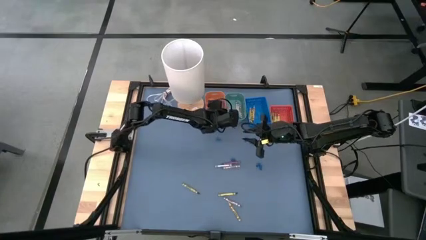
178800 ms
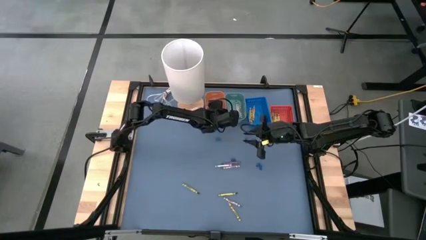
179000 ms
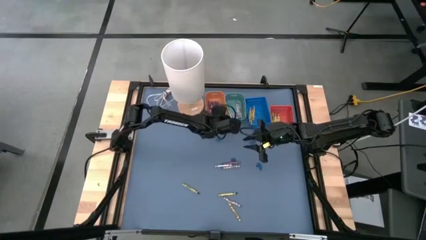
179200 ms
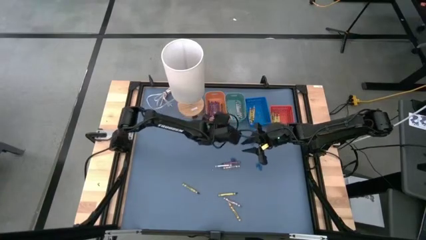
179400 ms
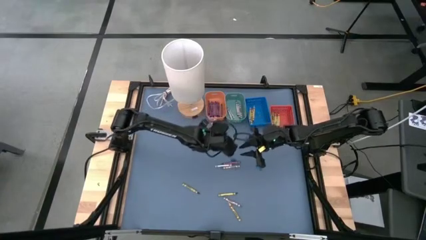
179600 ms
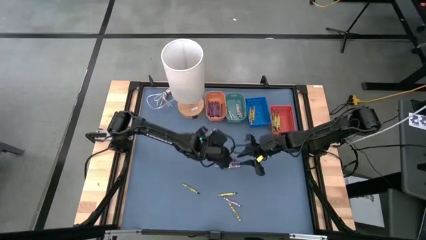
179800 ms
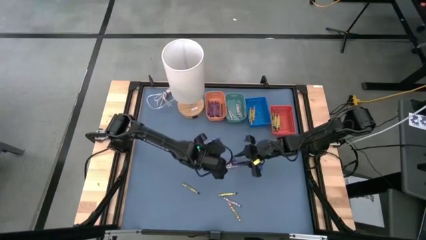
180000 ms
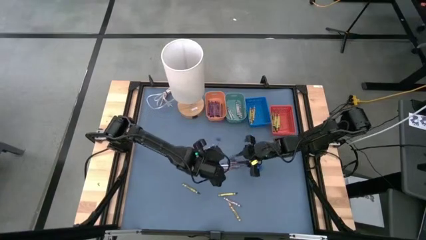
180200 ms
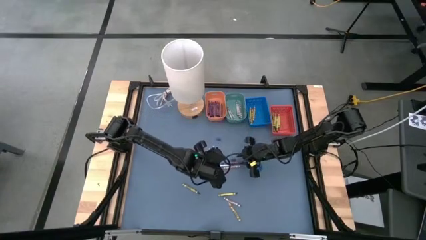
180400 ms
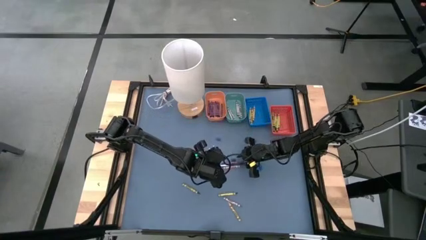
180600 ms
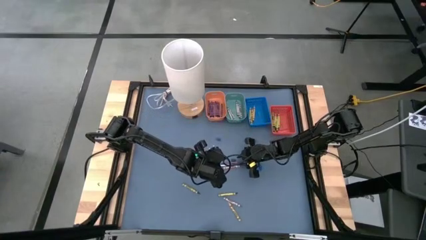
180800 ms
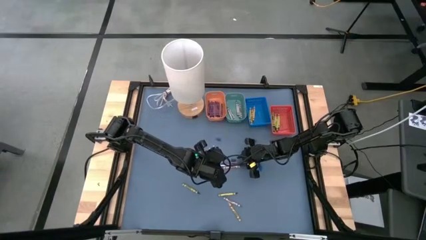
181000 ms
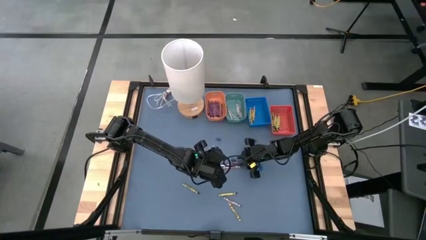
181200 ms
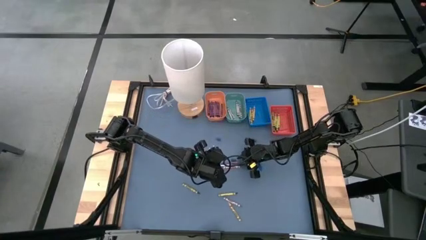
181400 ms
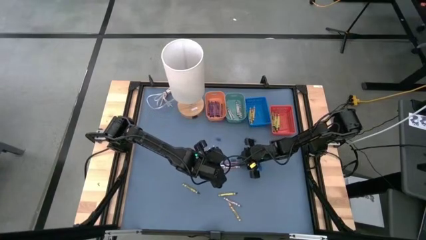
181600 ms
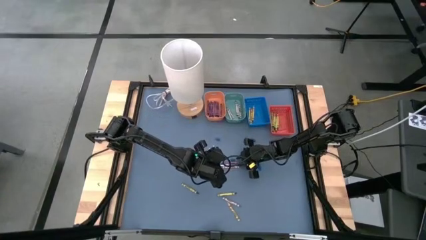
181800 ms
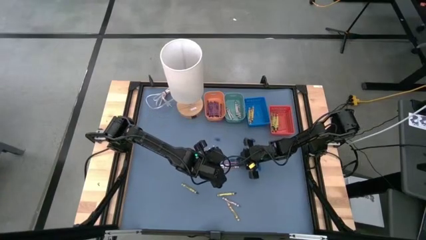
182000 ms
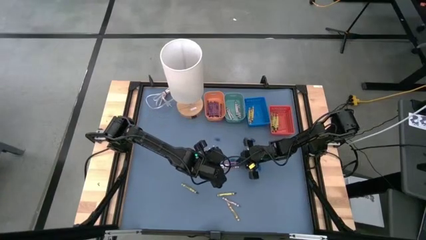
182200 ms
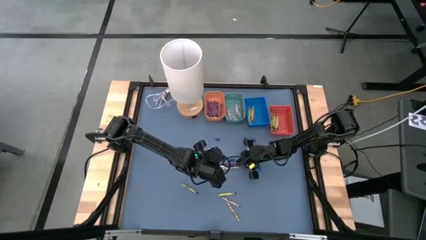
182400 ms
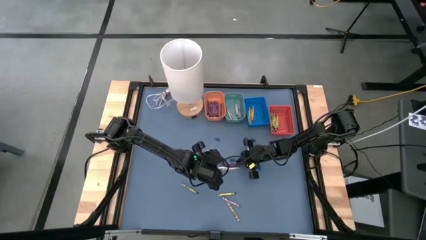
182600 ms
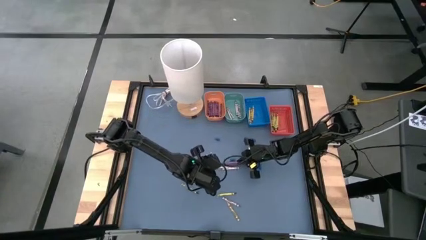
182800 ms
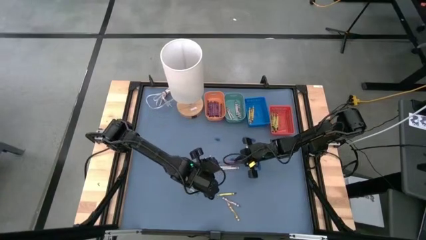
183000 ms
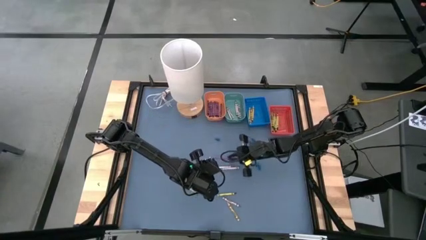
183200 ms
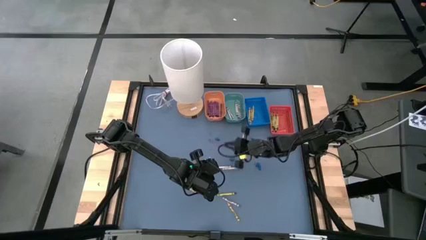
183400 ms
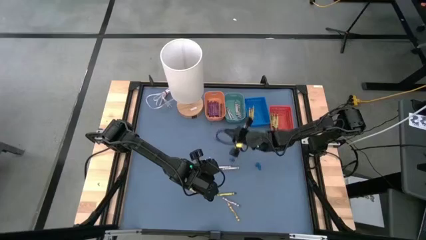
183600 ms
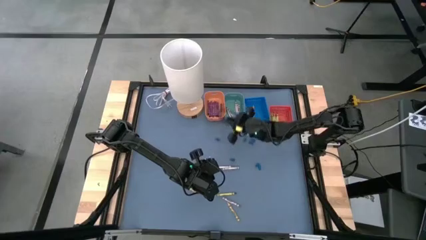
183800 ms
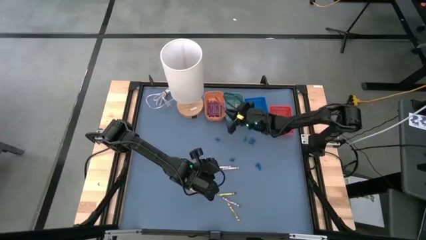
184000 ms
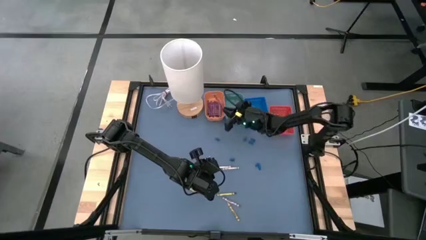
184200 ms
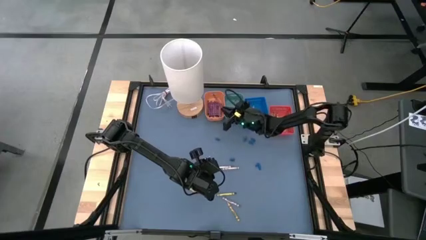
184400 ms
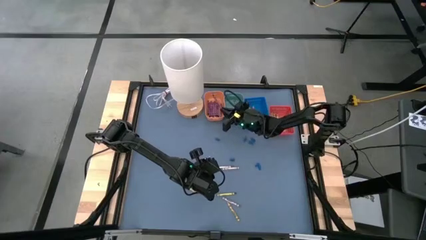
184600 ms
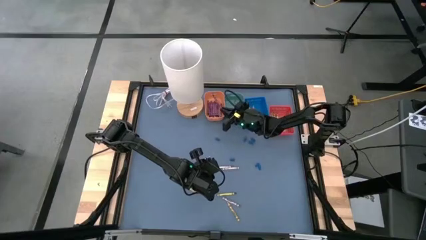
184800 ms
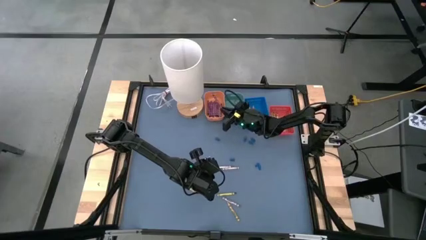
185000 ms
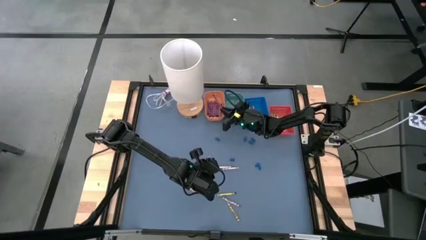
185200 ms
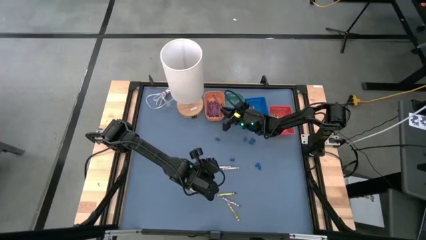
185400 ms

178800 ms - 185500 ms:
Task: Sort crayons
Put the purple crayon into the light orange bin

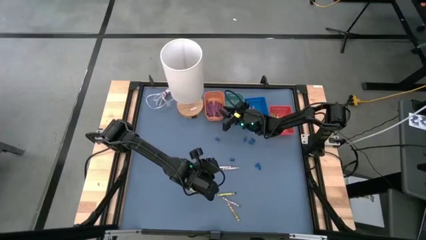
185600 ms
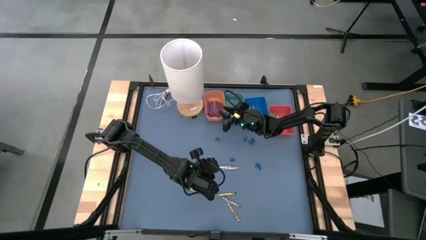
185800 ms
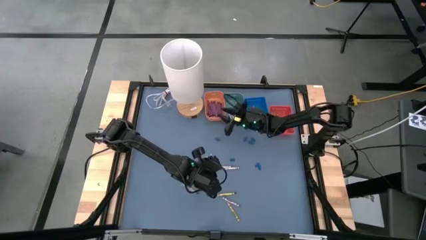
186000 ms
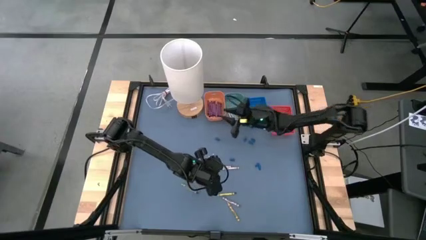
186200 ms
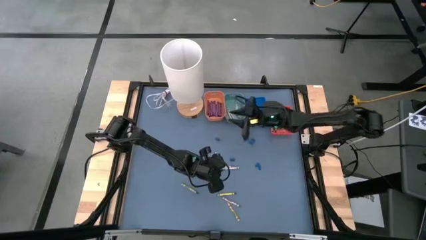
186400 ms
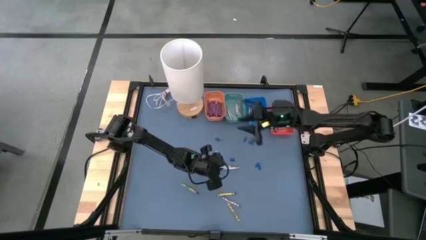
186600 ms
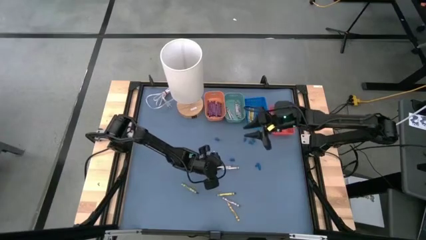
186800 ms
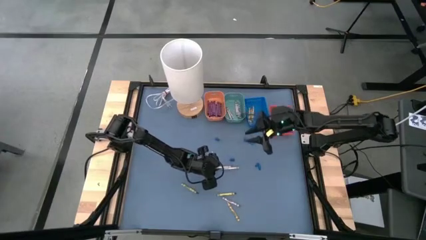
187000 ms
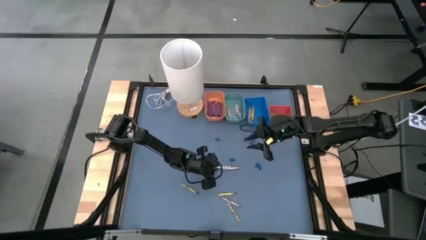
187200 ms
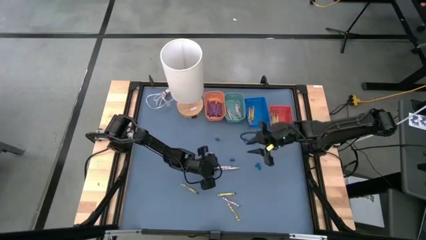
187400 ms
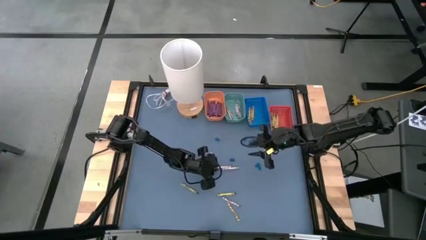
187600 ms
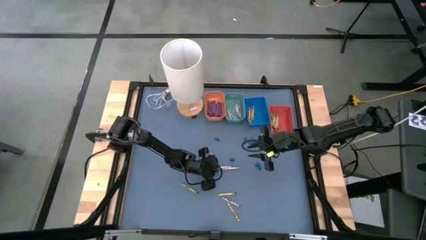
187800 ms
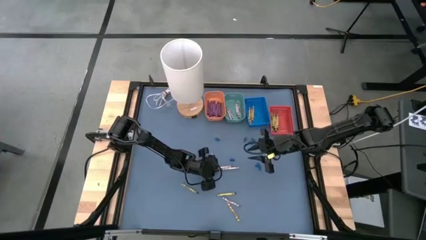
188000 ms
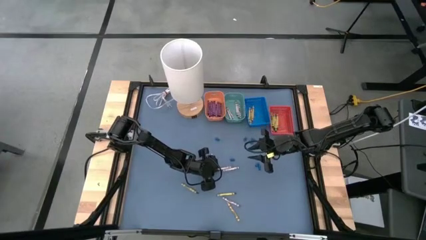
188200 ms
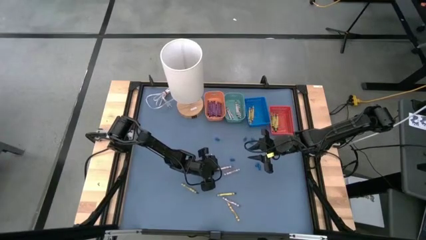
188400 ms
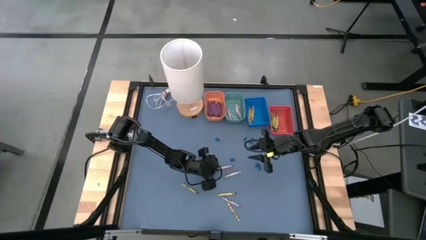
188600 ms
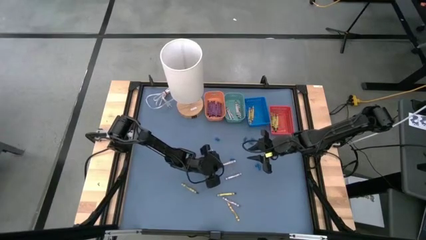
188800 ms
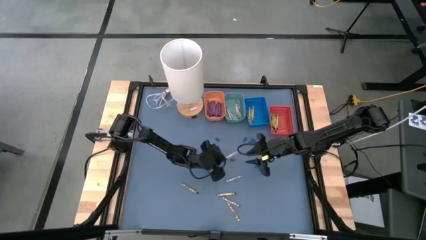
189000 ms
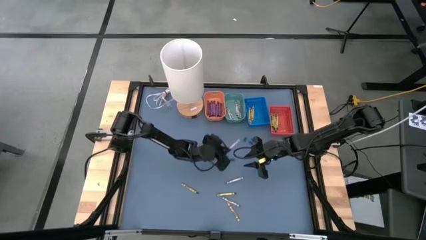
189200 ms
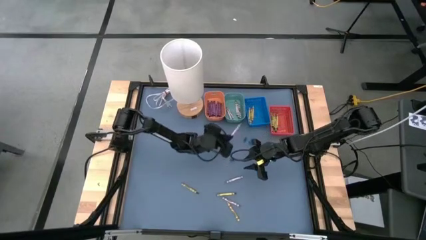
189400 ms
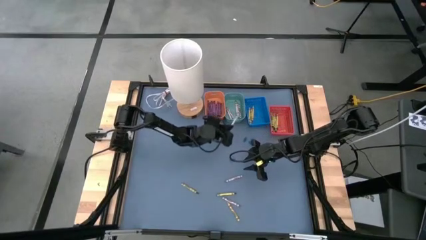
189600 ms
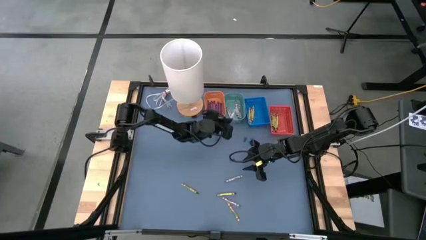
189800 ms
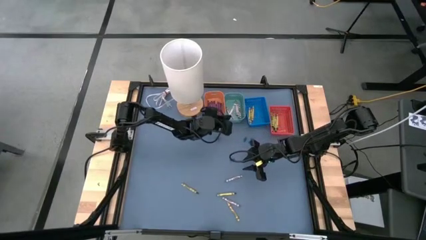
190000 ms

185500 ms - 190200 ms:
Put the gray crayon into the green bin

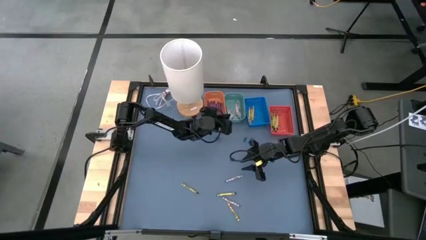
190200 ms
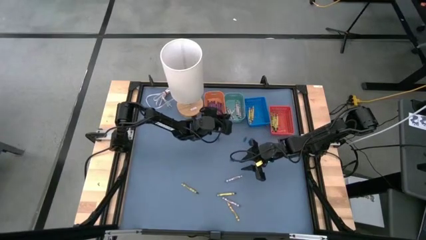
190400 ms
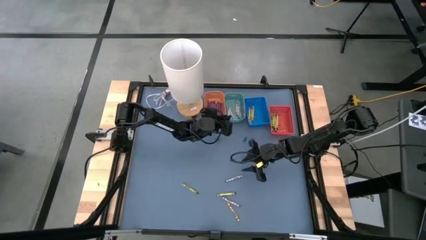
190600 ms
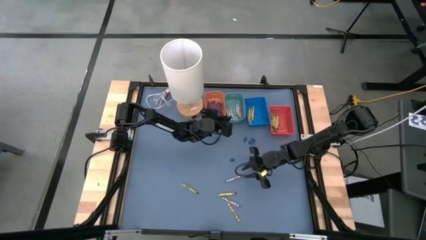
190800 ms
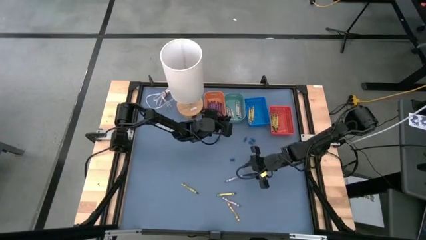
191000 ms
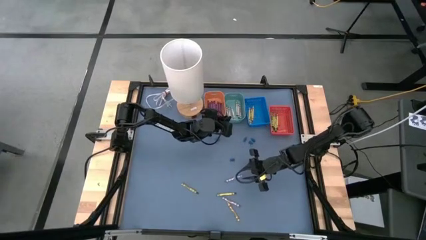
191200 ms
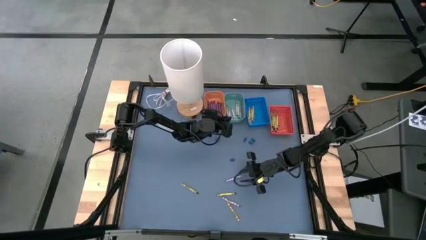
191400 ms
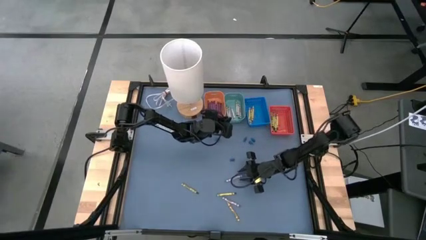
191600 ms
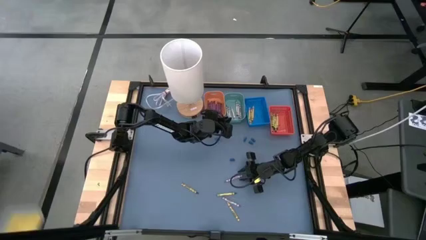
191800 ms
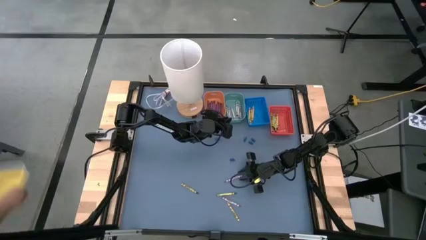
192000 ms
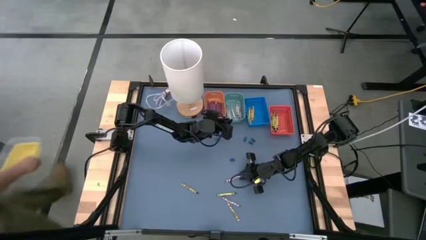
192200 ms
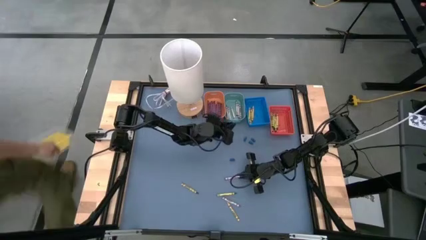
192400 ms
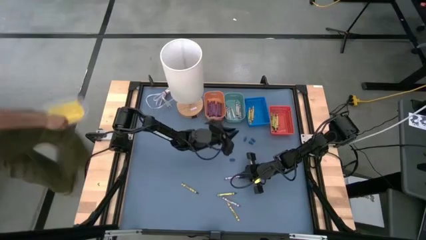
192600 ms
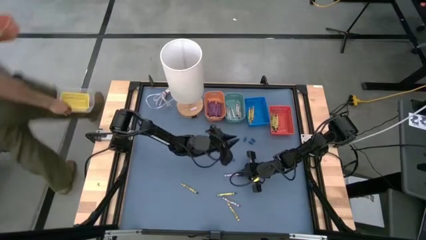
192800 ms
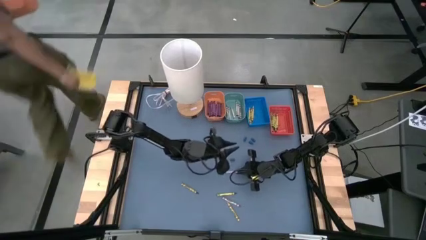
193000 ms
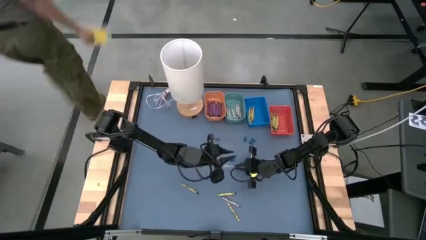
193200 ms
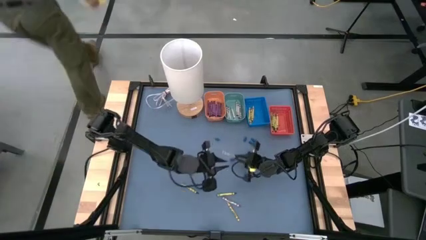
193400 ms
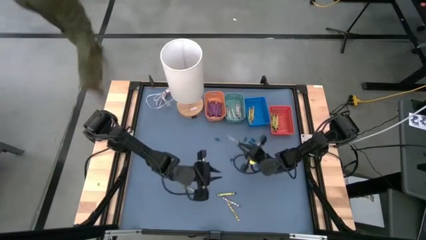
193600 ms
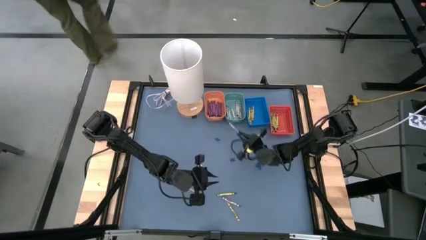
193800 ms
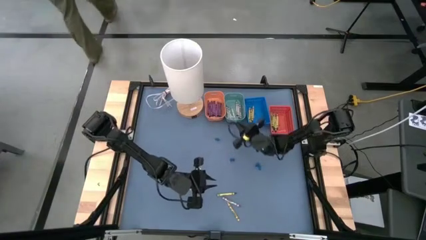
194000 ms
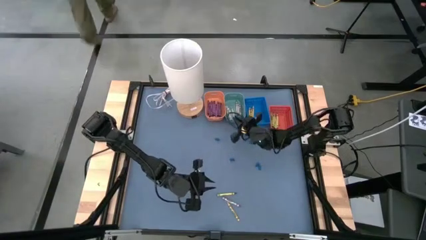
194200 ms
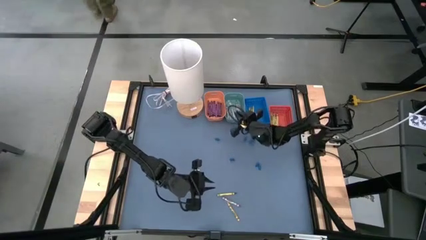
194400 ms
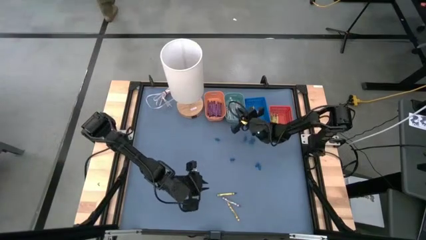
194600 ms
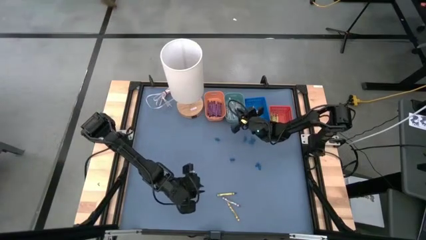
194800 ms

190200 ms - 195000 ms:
Put the gray crayon into the green bin

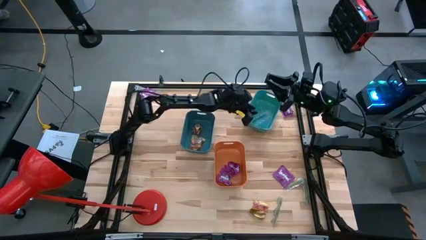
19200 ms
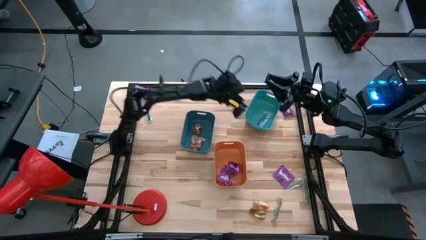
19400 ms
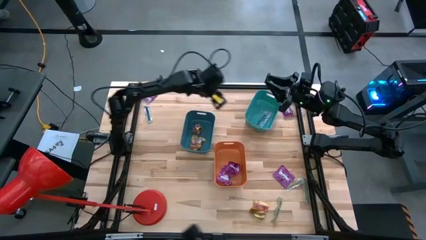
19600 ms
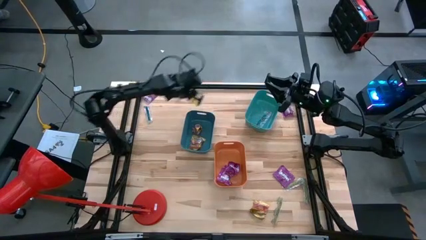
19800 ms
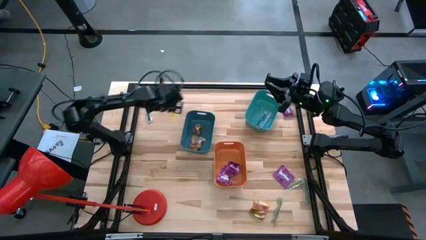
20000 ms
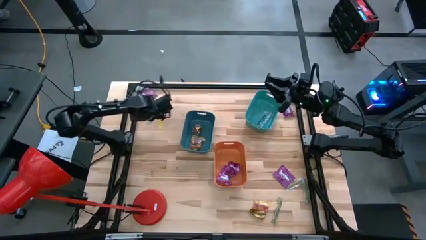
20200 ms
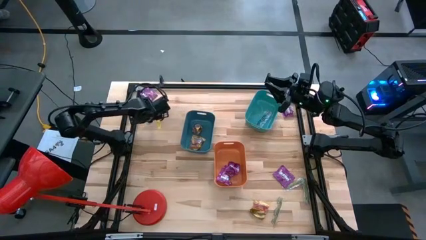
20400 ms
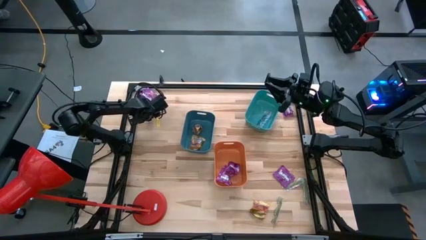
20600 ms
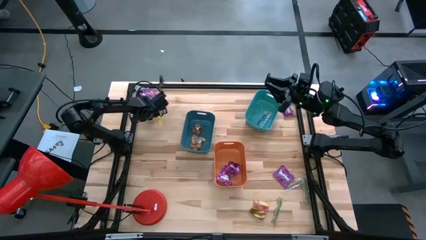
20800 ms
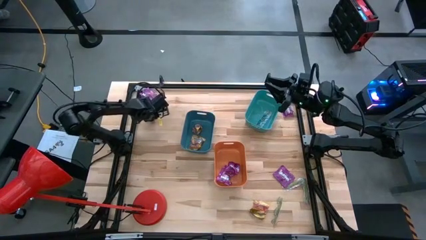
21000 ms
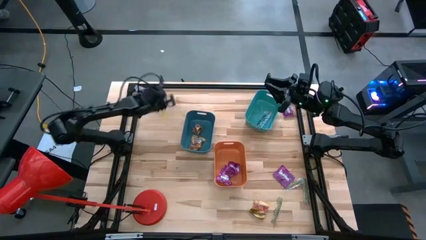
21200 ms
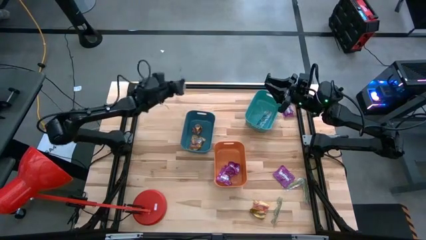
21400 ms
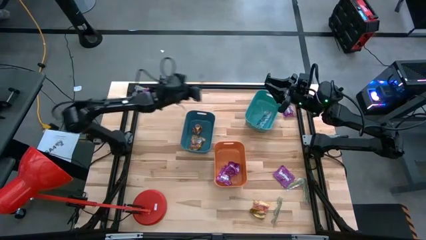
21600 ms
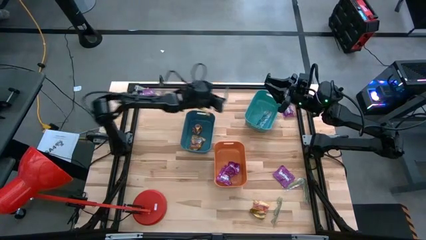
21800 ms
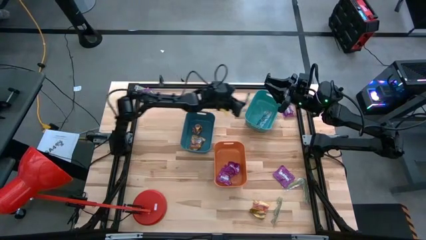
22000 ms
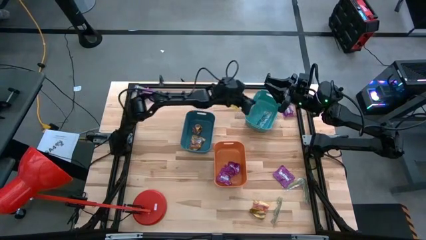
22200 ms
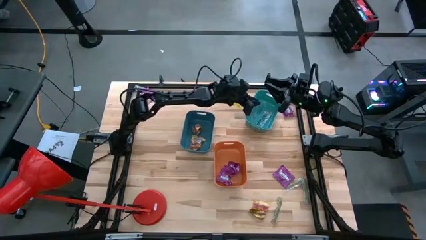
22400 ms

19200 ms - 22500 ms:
Task: Sort candy
Put the green gummy into the green bin
